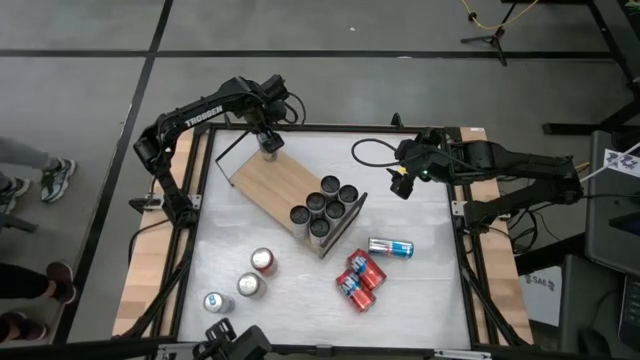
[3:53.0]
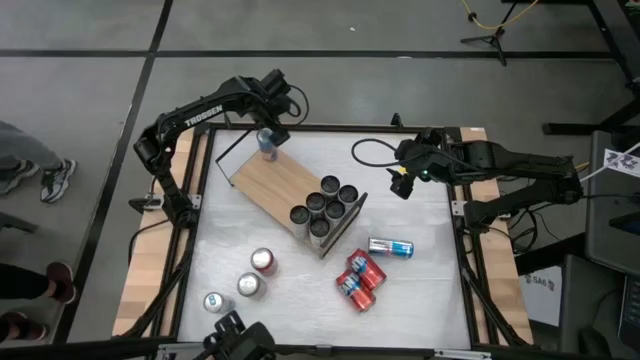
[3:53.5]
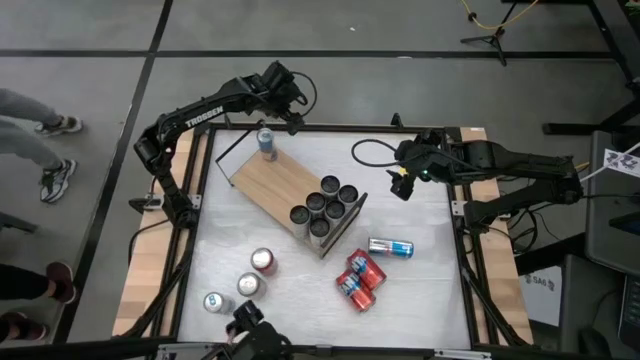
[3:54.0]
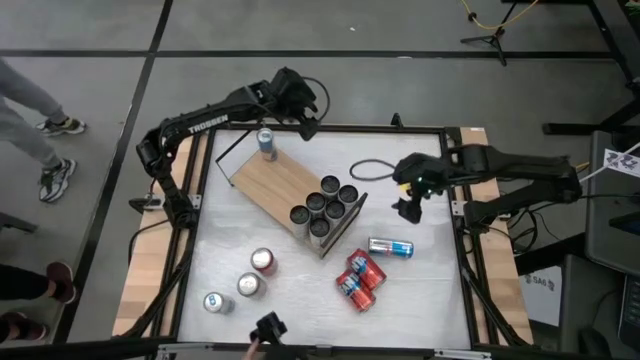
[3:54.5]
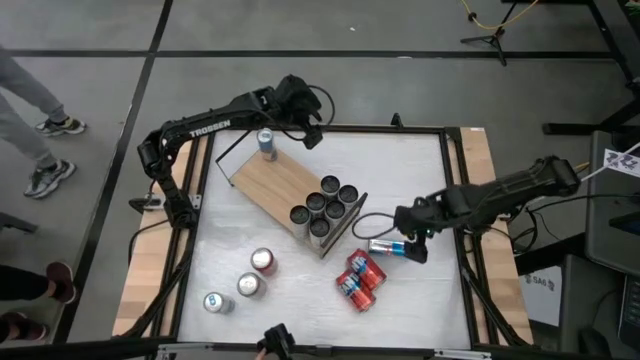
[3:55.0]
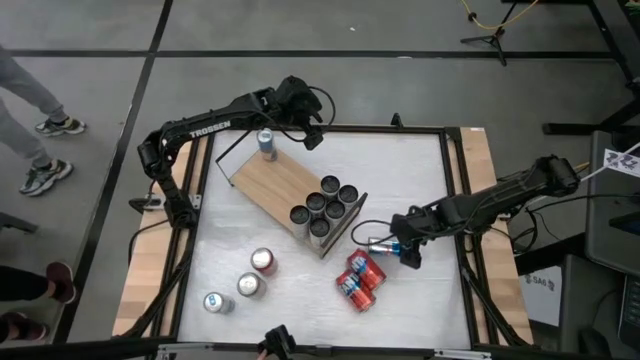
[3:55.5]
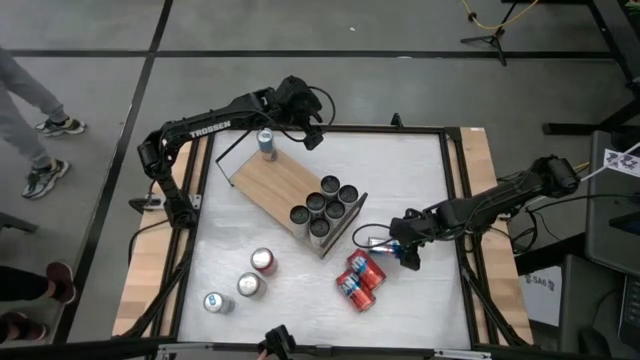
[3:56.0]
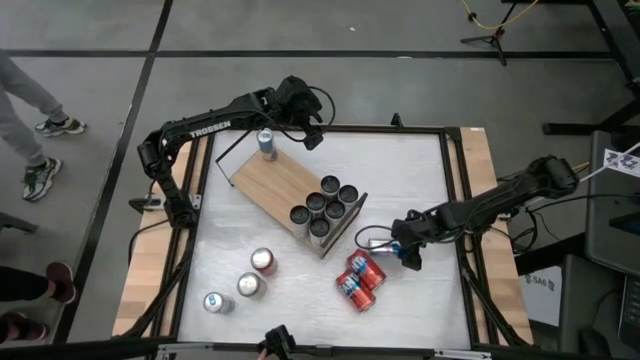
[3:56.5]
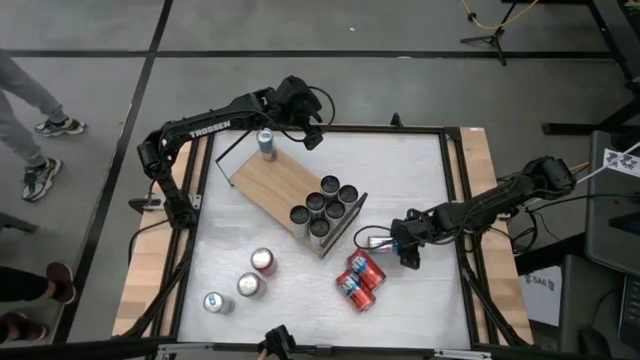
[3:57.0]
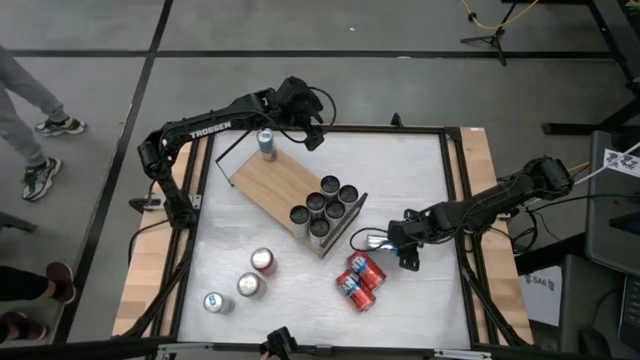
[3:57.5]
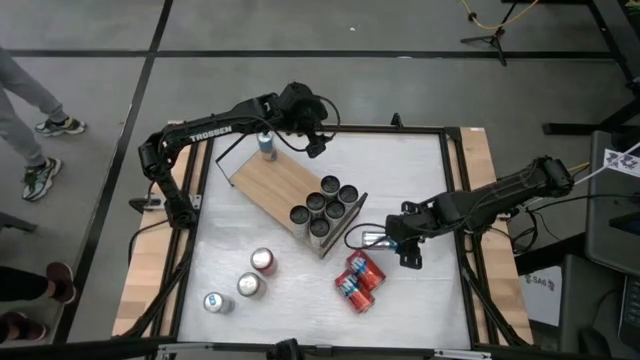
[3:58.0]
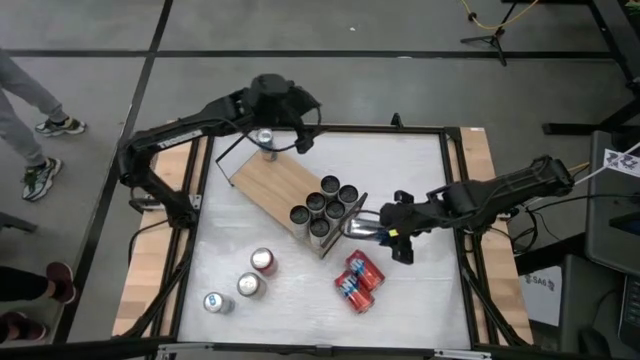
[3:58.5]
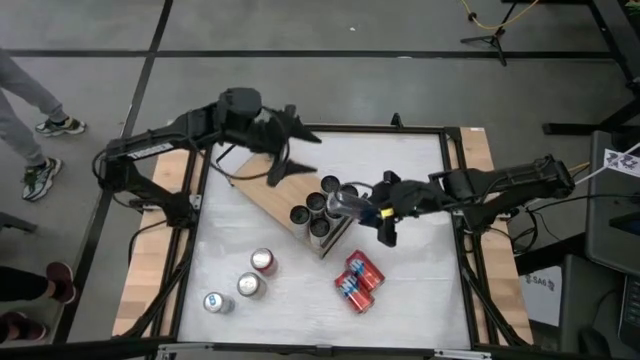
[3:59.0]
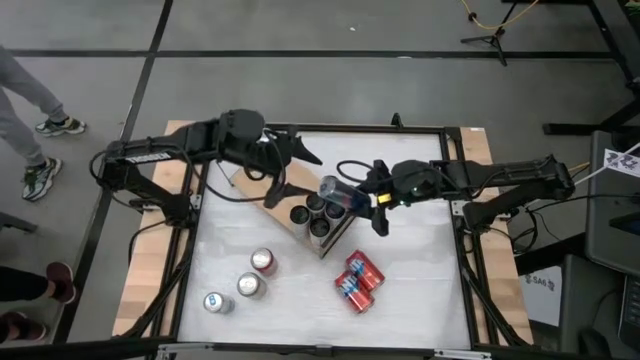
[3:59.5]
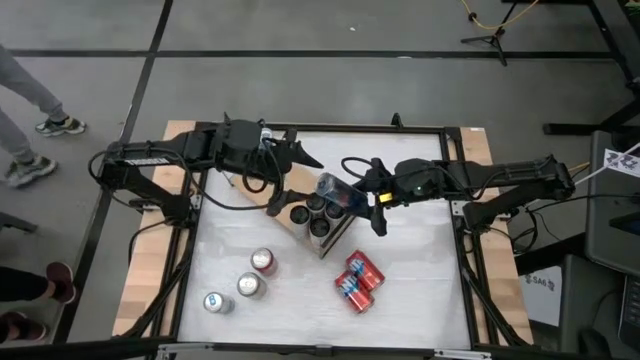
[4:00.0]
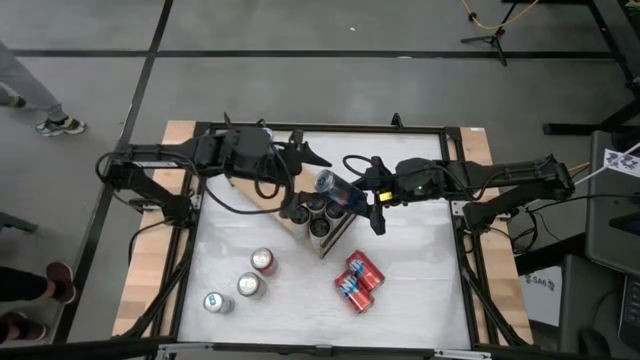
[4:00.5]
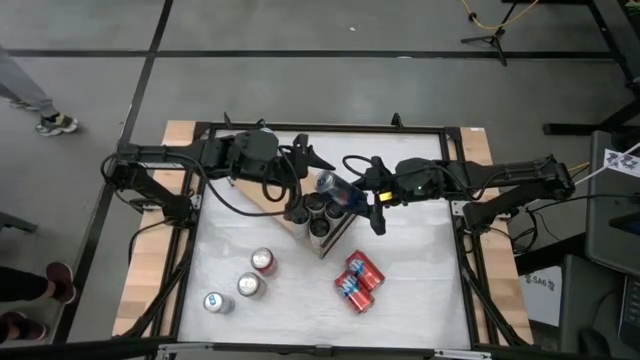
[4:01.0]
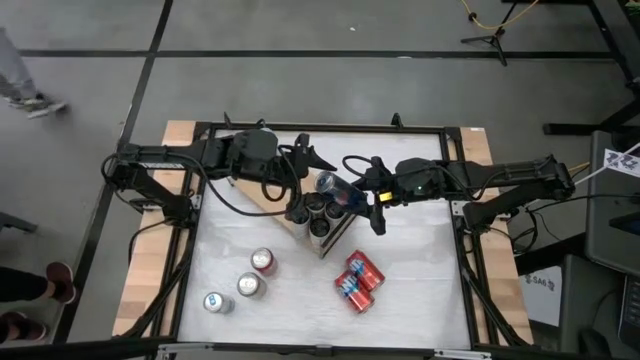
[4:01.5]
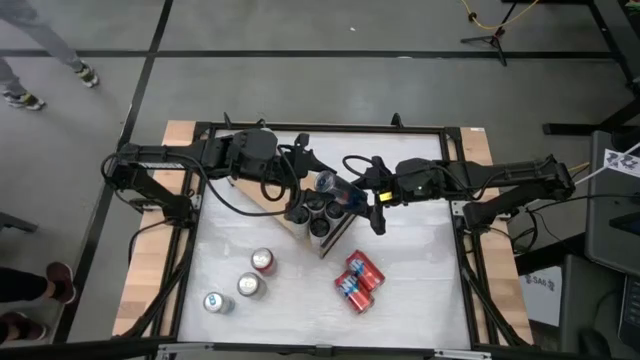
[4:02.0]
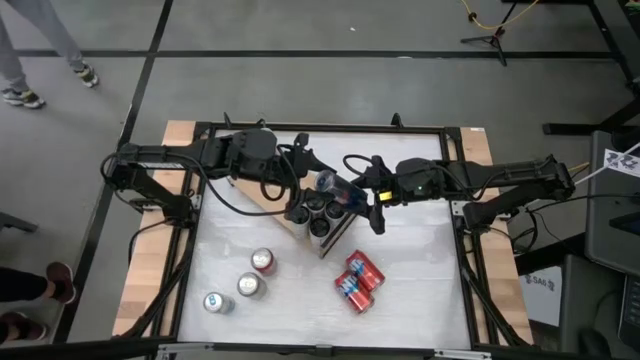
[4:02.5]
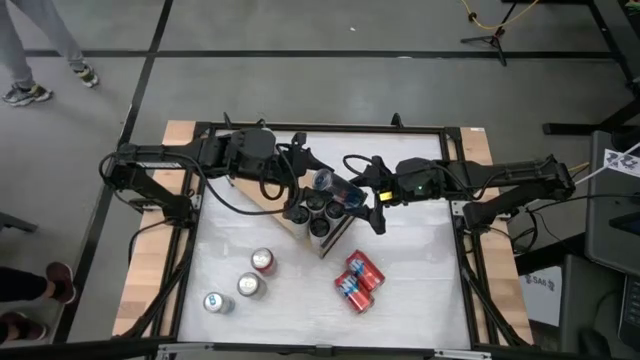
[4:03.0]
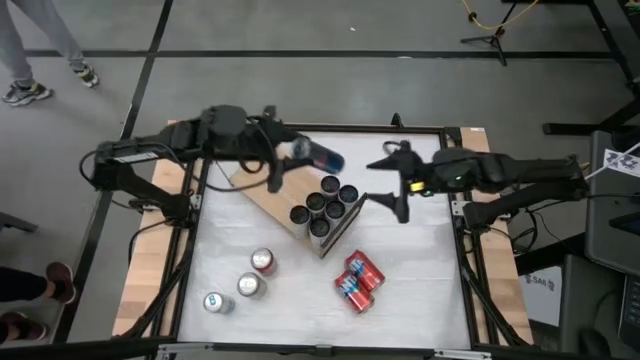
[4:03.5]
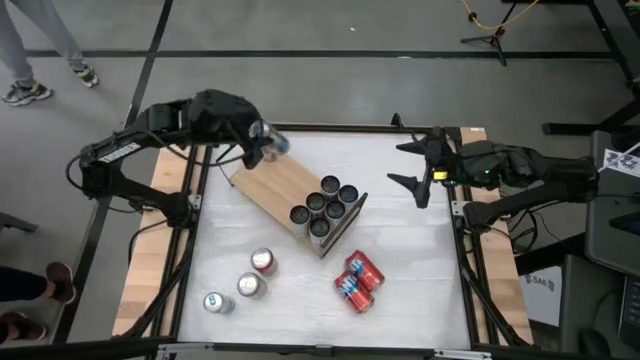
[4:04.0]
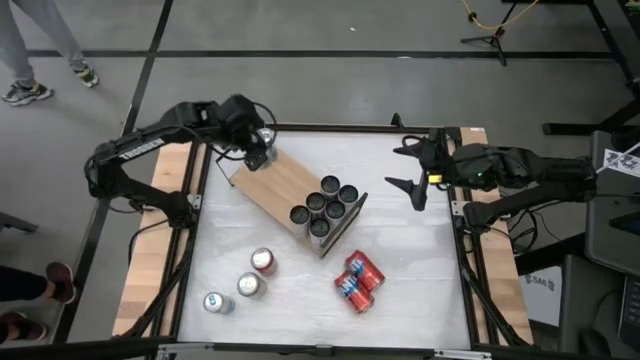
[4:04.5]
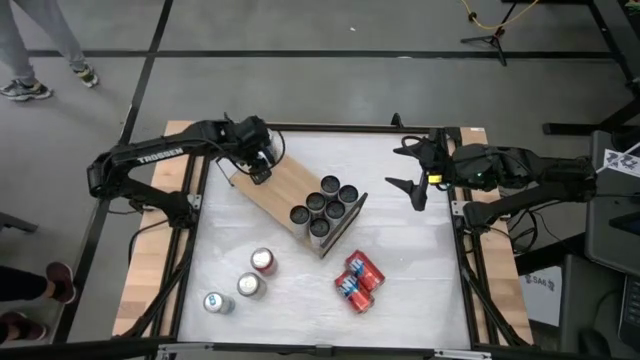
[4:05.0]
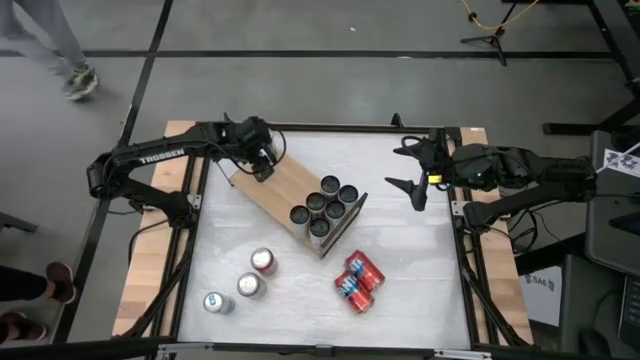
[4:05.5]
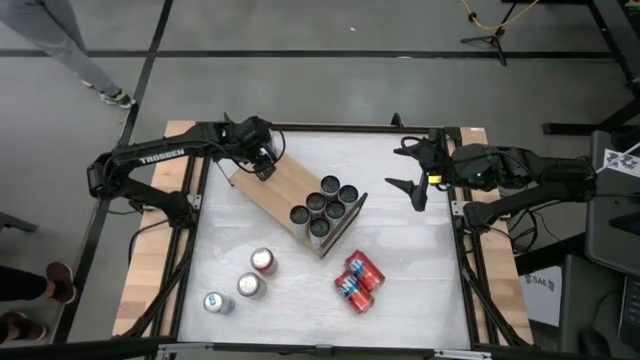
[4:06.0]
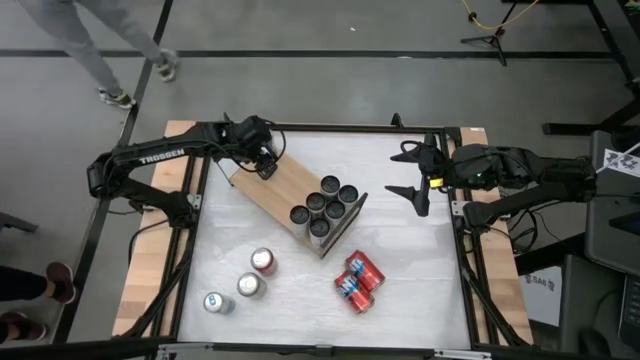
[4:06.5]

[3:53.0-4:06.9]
Task: Place canned beverage on shelf
Put the right blue soda can on the shelf aligned with the other blue soda can
